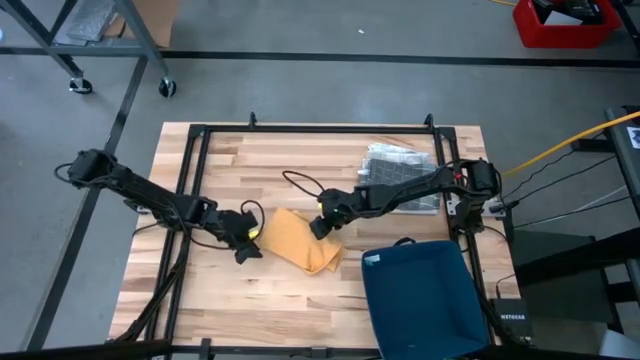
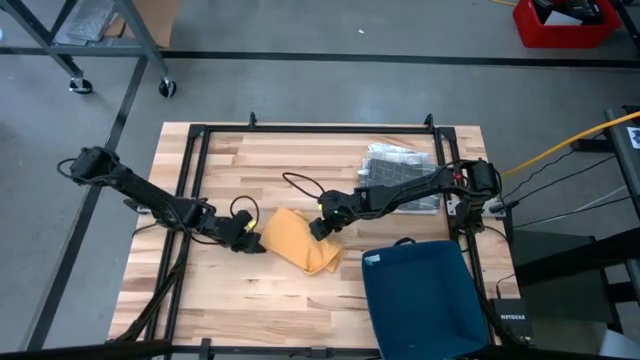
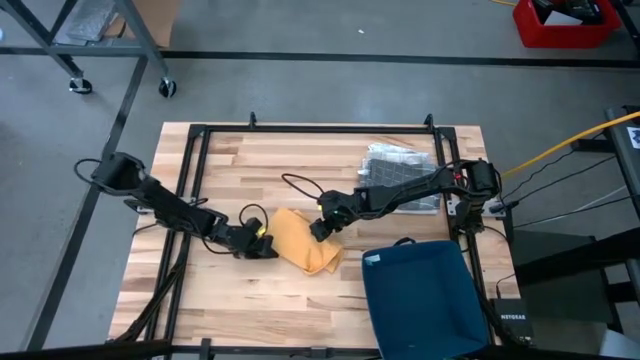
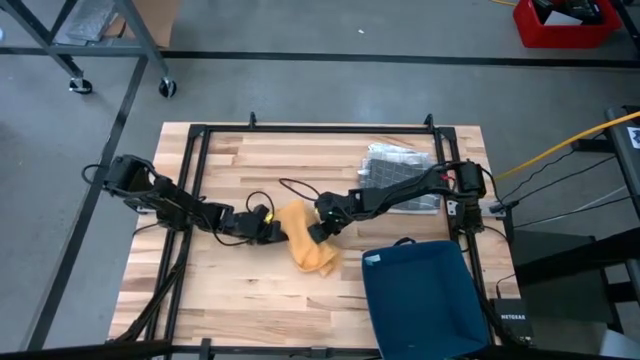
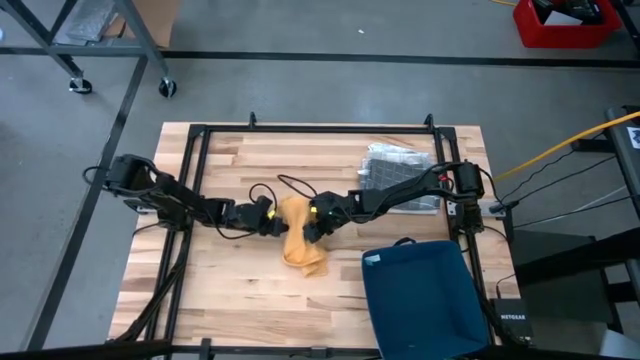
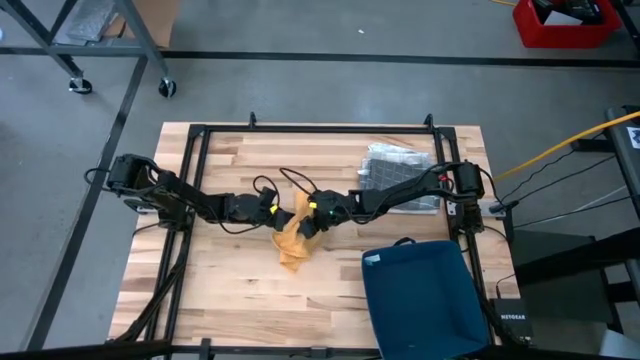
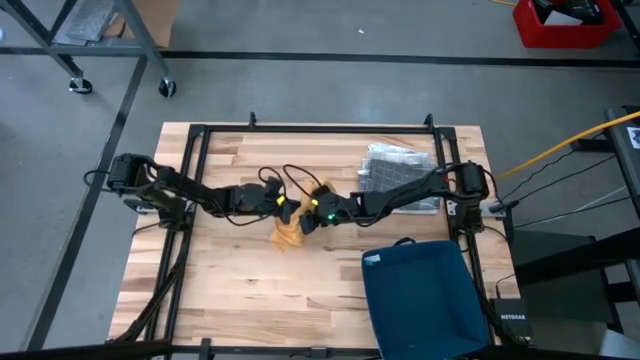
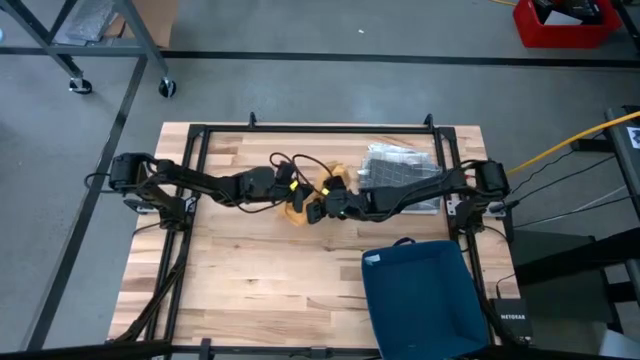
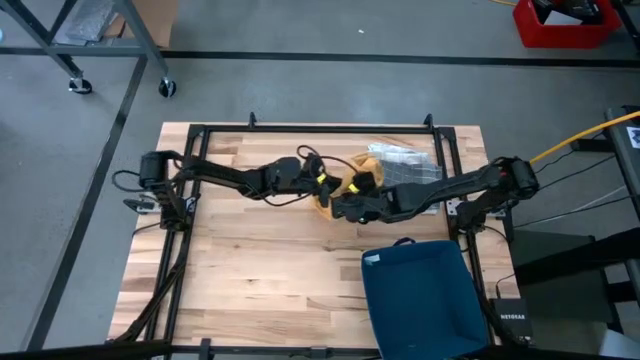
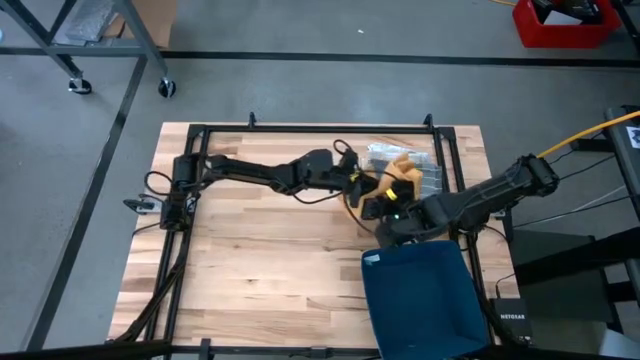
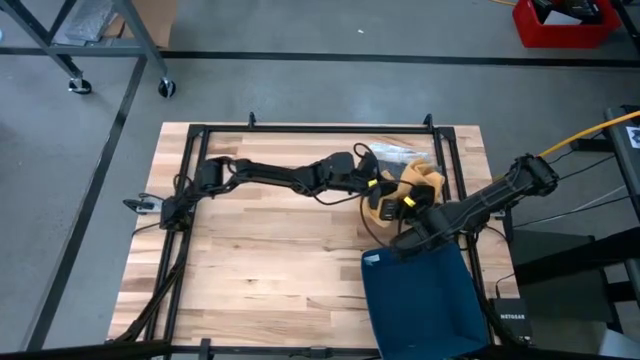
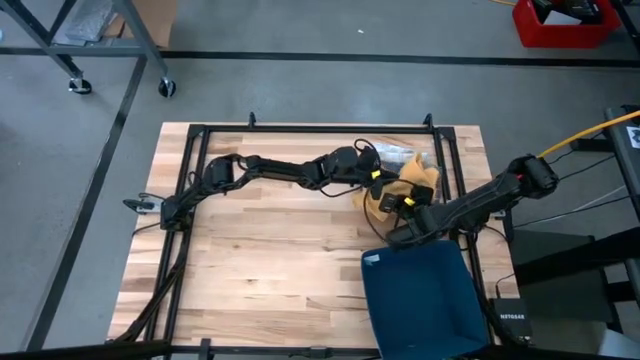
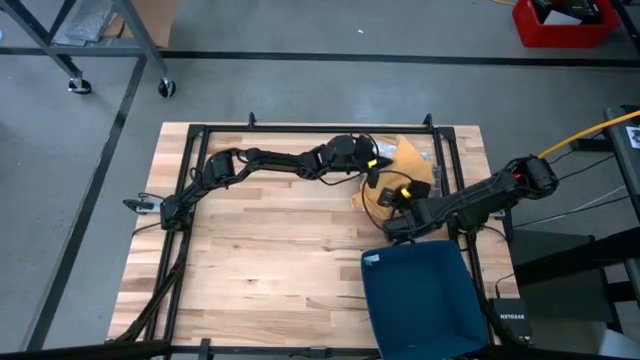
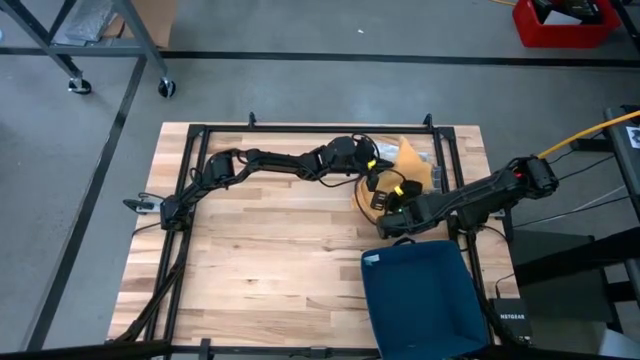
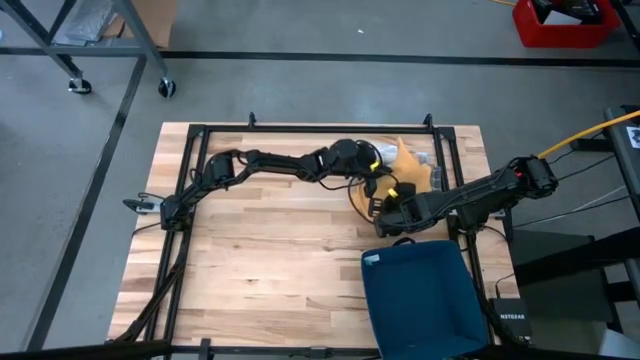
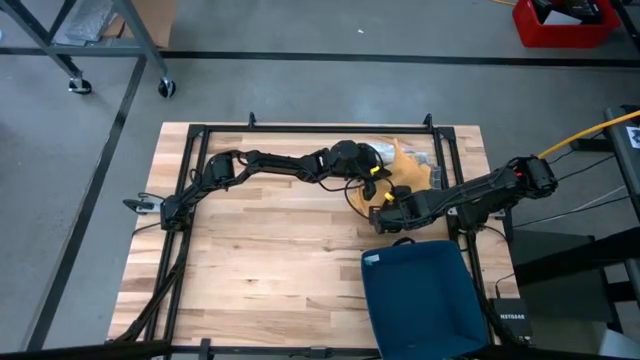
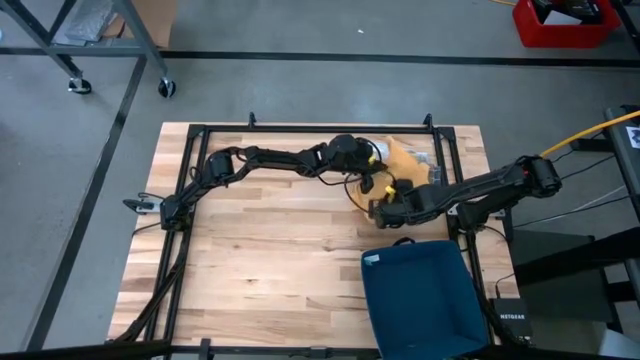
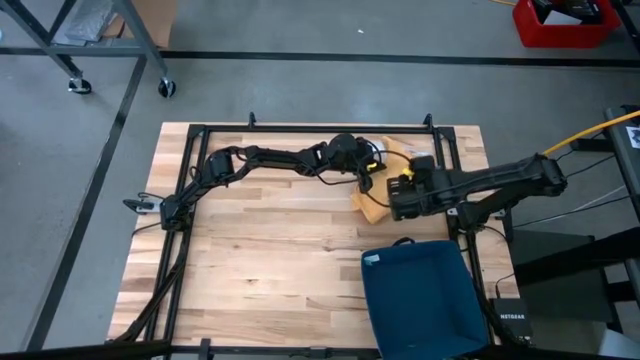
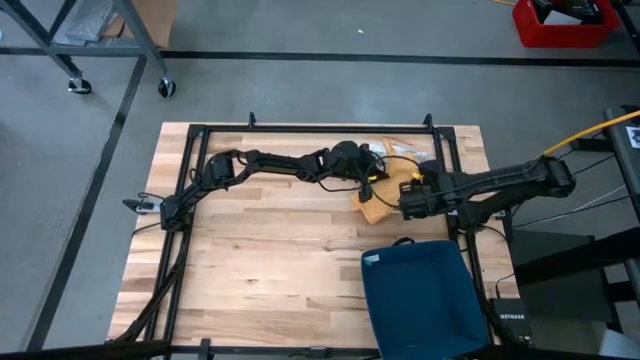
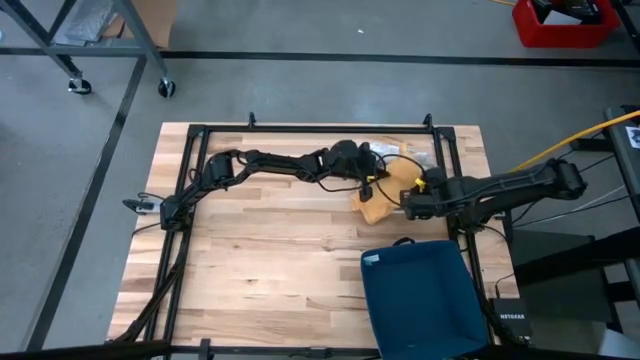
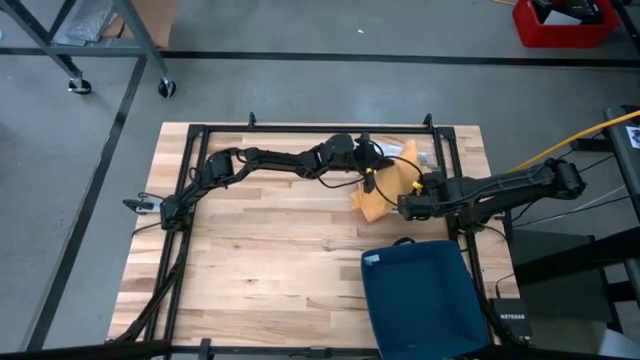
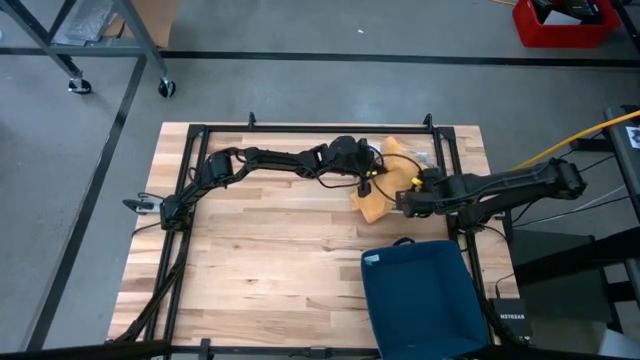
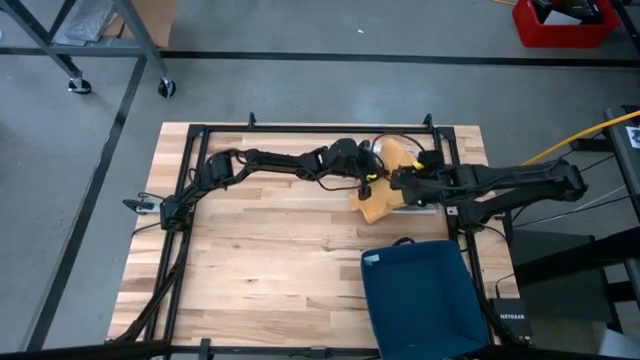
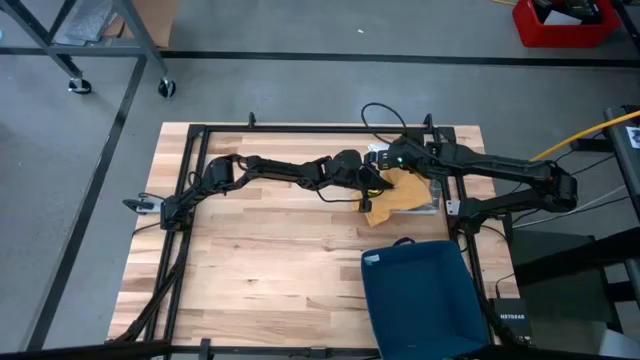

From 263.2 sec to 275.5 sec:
Task: Fold towel
Stack the yellow towel on top of the gray towel

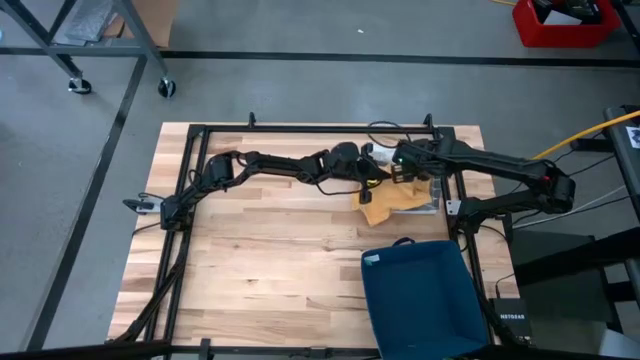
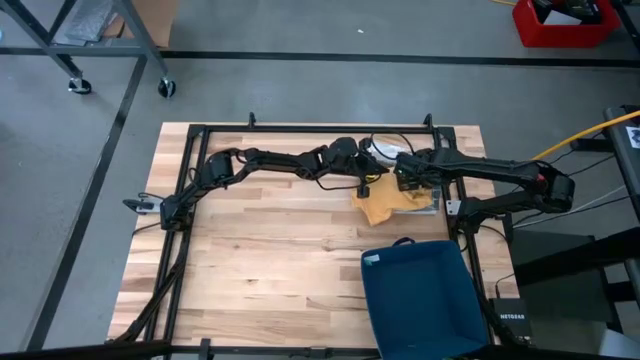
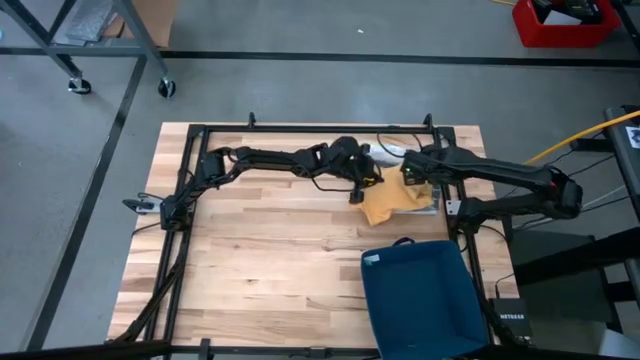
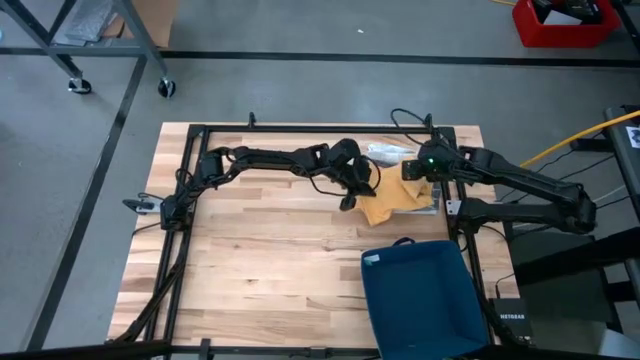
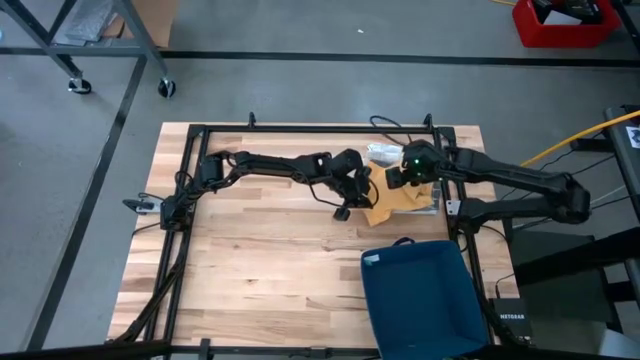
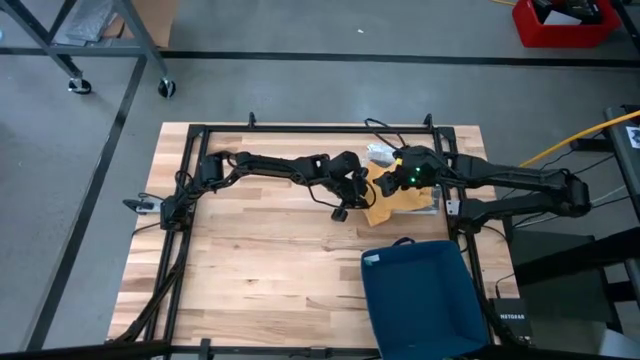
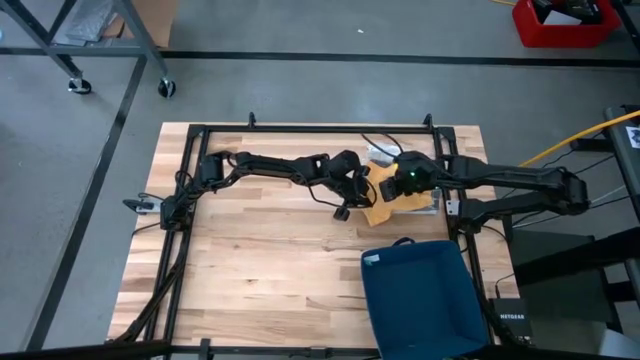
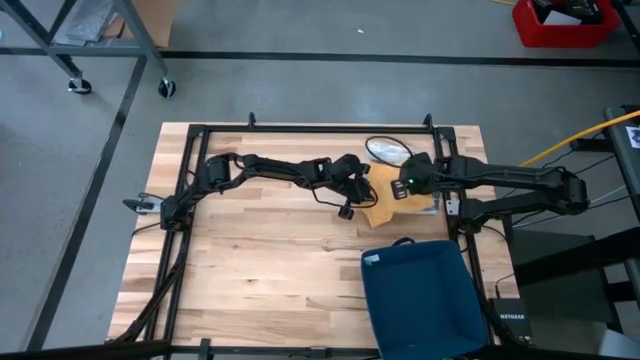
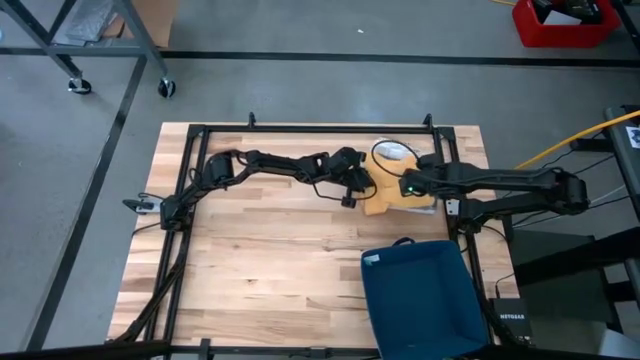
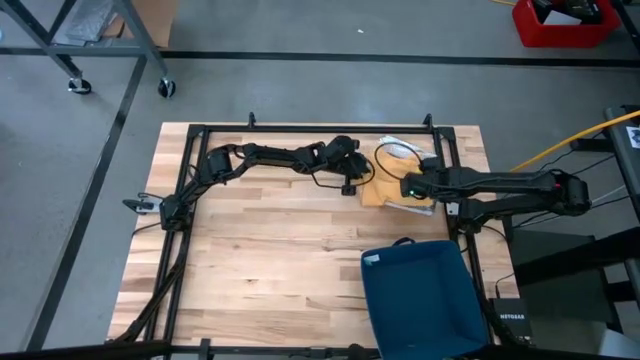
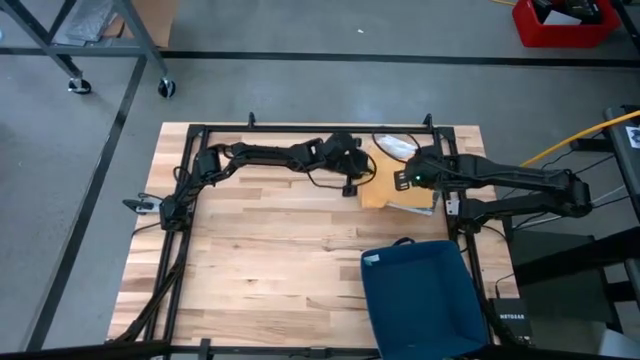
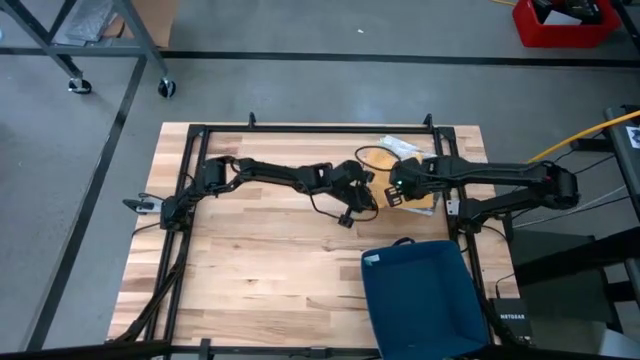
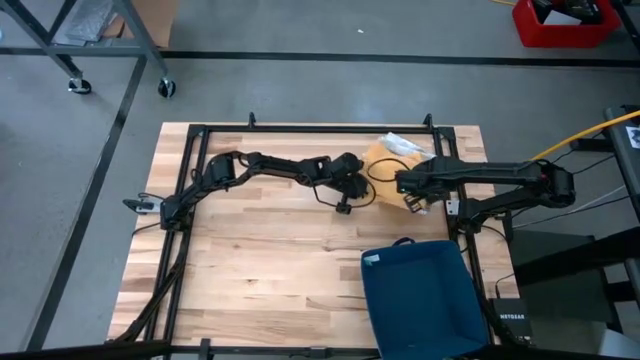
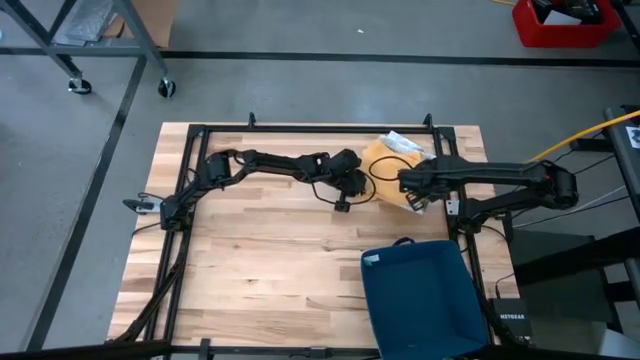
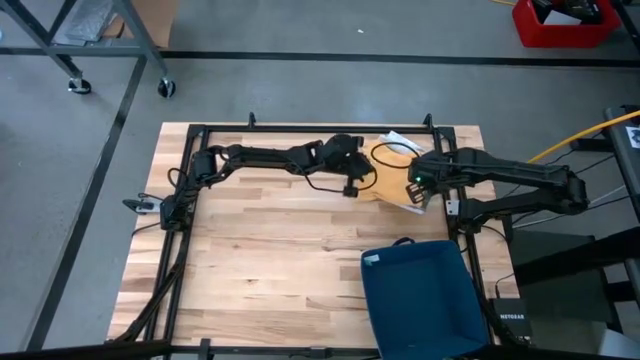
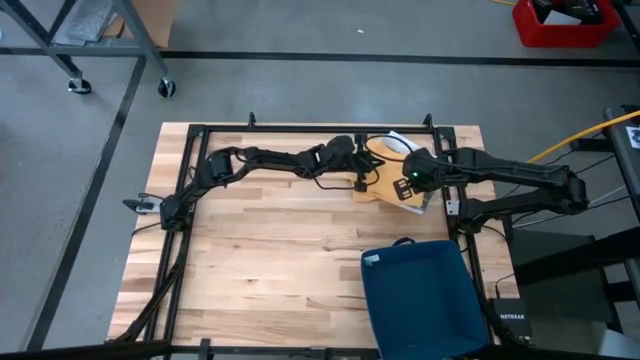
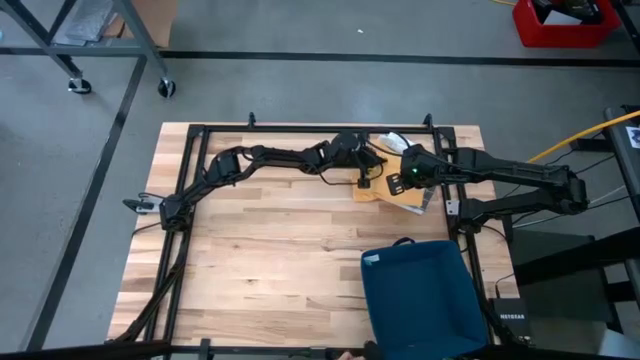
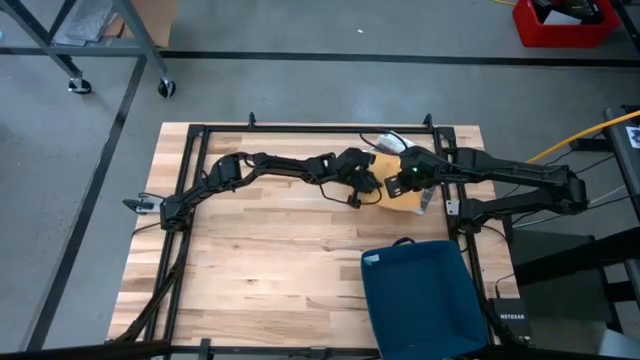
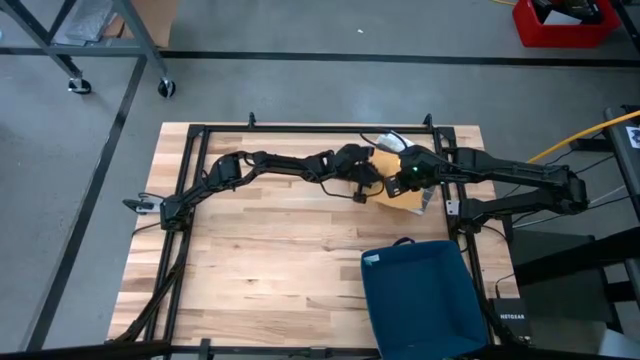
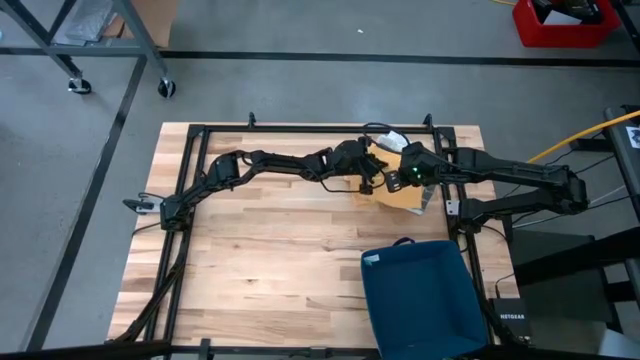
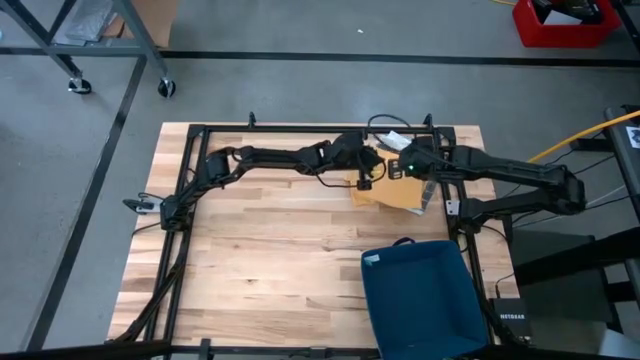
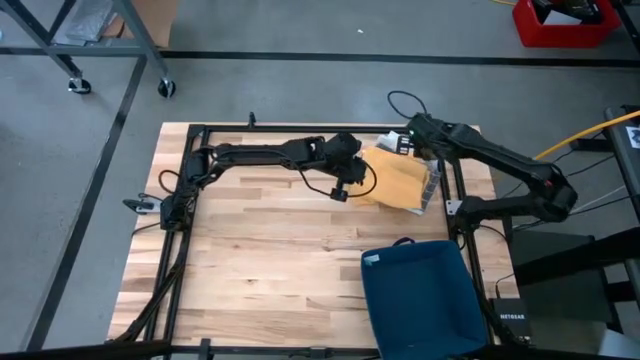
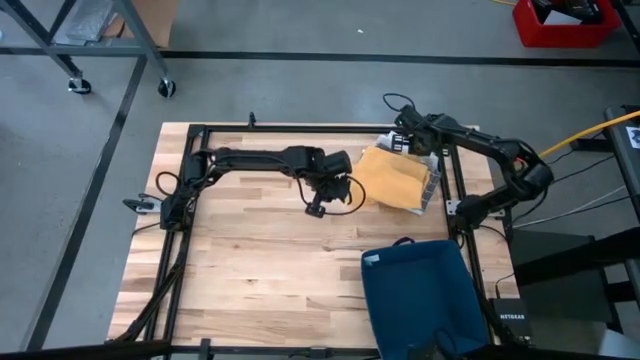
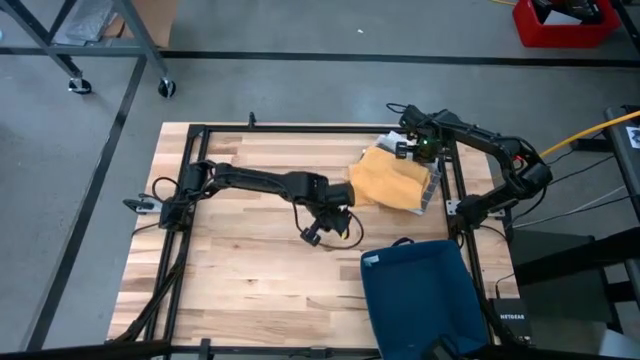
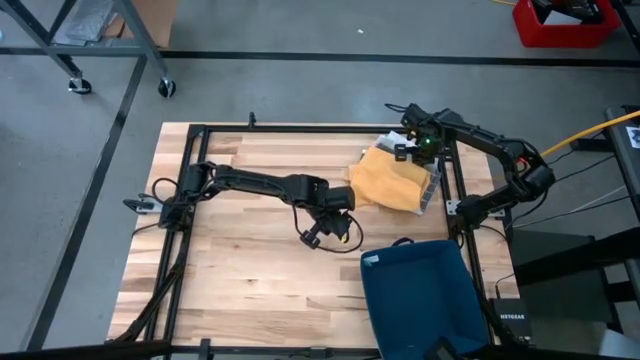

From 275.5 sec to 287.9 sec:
Stack the yellow towel on top of the gray towel
